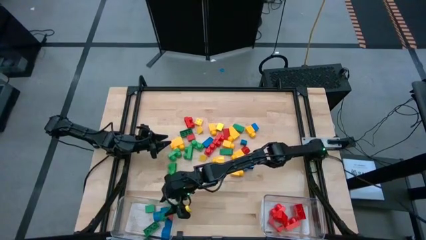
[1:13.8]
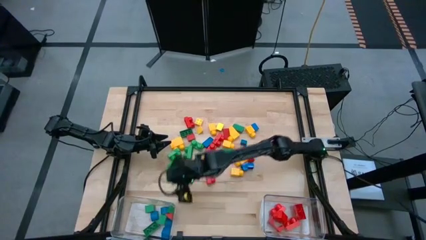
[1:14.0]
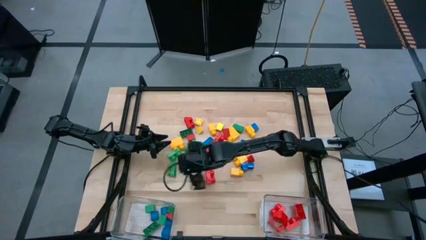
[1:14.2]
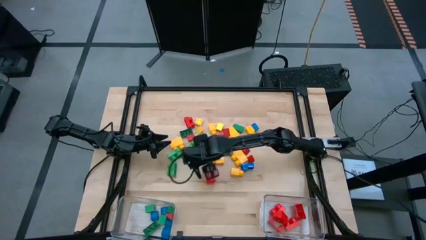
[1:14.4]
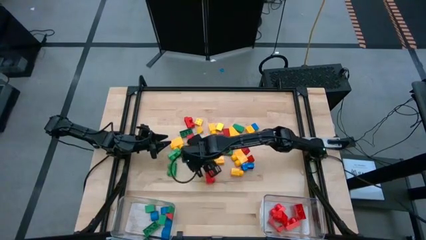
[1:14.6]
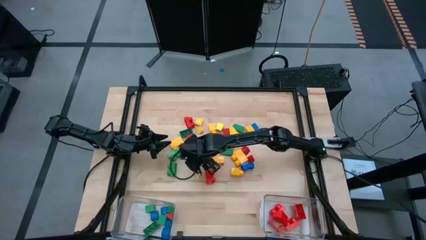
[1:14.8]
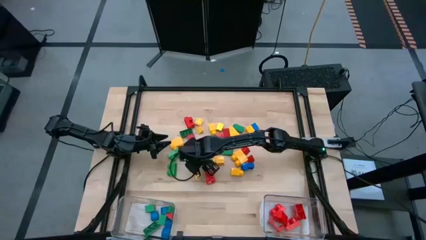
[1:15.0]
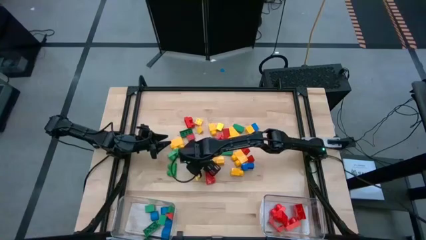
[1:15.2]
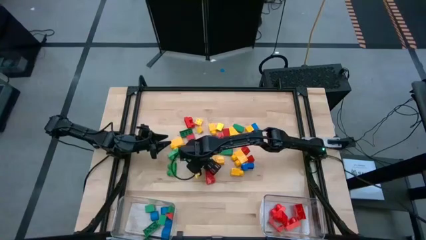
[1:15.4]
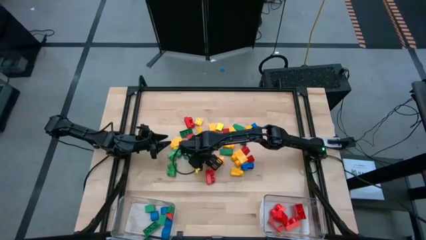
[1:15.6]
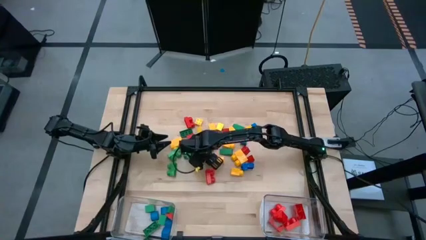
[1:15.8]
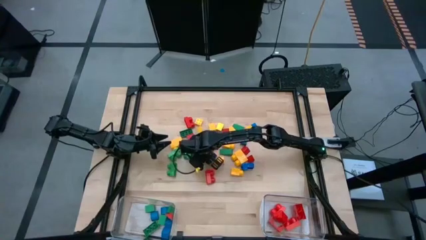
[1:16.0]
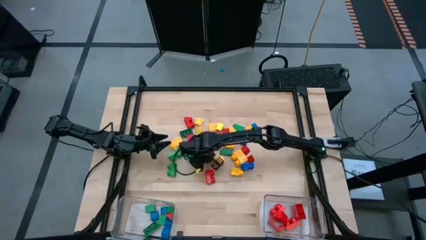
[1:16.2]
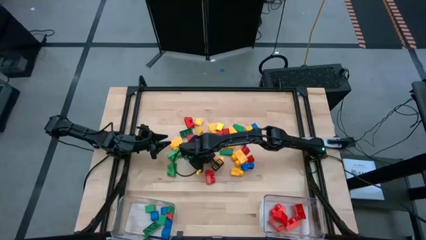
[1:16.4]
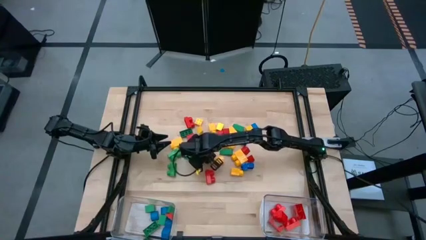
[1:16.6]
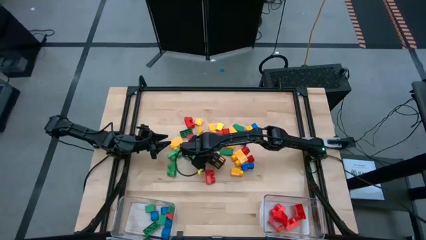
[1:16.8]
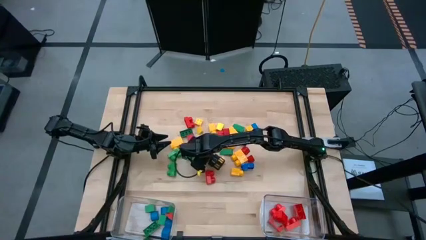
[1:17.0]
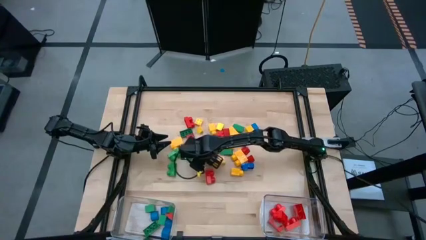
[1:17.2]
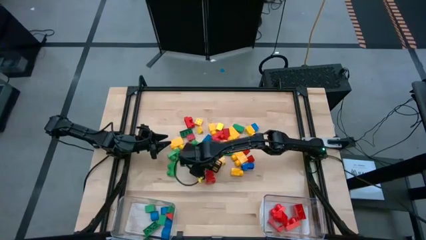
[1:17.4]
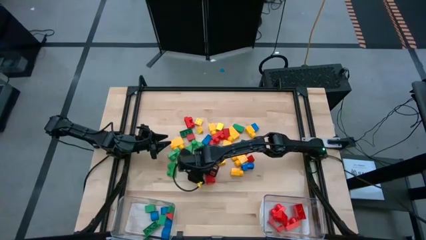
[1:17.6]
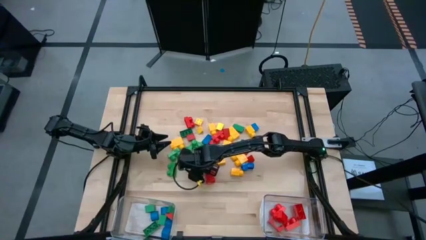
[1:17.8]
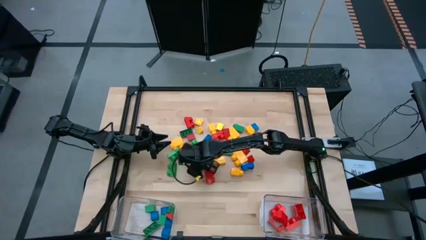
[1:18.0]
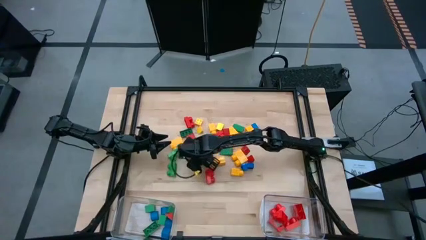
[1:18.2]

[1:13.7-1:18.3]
Task: Sort blocks by size
Put the yellow triangular block into the right transparent bin

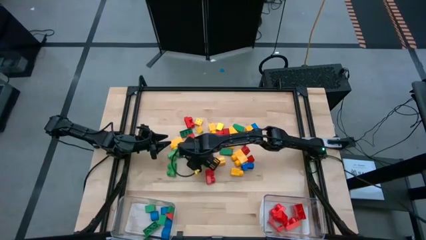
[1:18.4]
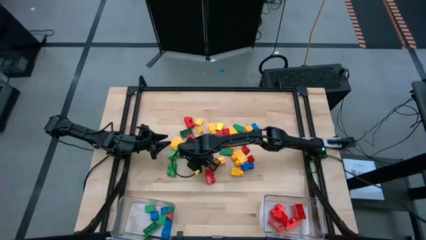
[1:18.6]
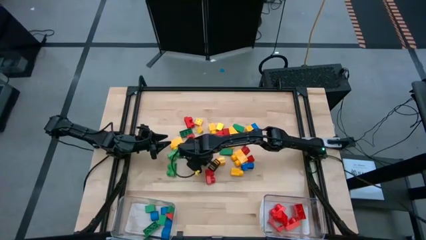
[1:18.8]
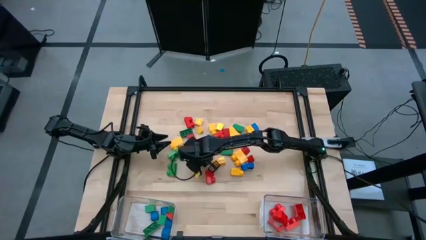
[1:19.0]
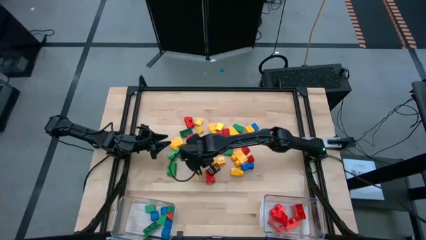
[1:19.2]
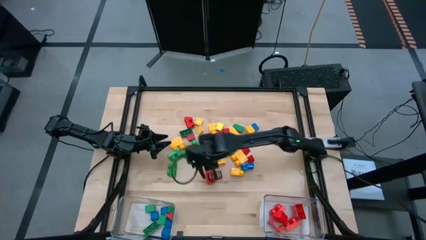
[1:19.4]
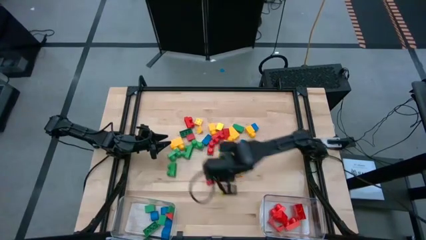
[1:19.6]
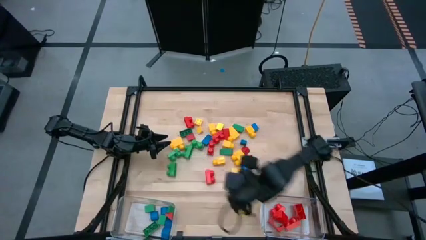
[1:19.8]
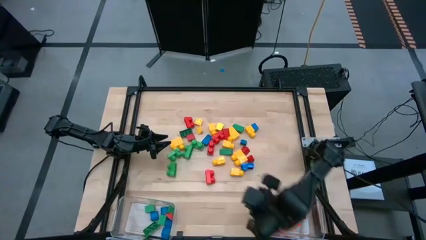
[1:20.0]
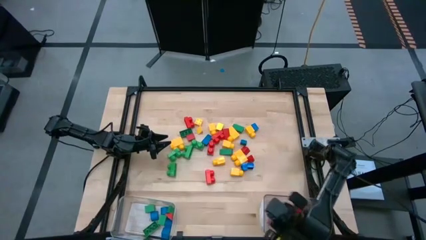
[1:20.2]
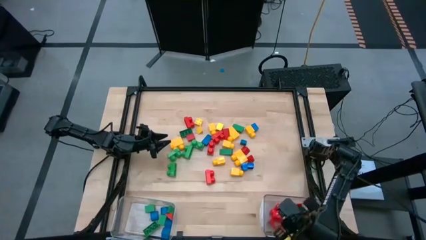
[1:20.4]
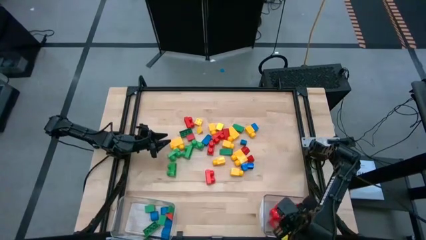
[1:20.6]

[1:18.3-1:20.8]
Put the yellow triangular block into the right transparent bin

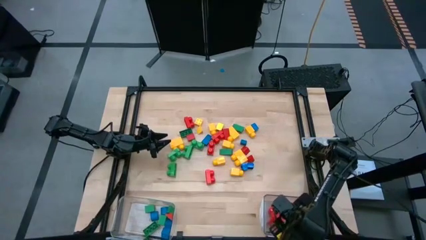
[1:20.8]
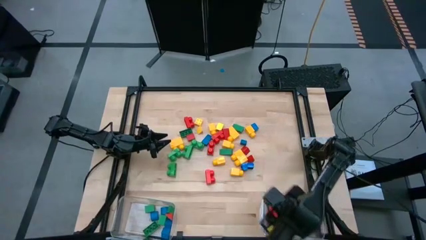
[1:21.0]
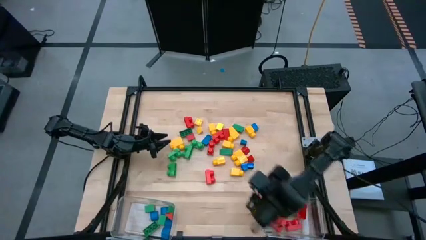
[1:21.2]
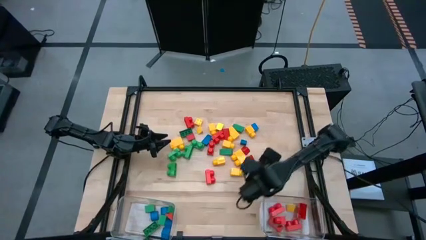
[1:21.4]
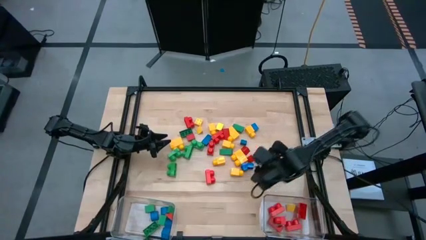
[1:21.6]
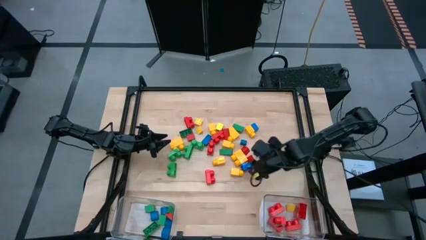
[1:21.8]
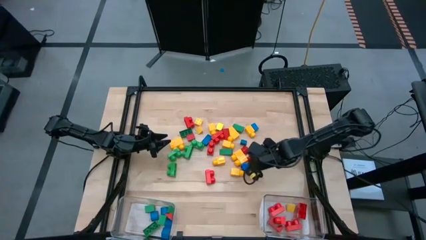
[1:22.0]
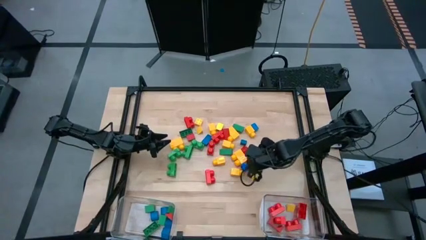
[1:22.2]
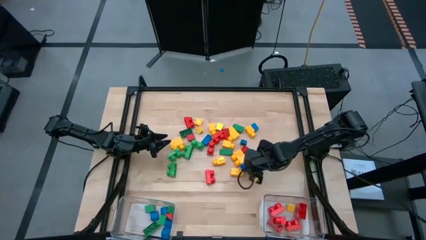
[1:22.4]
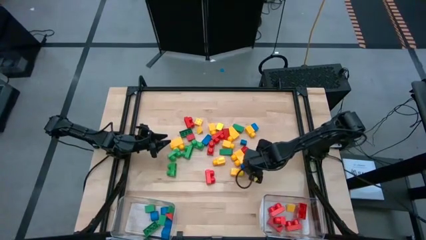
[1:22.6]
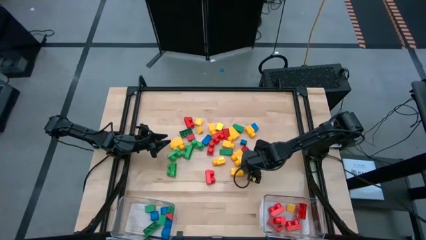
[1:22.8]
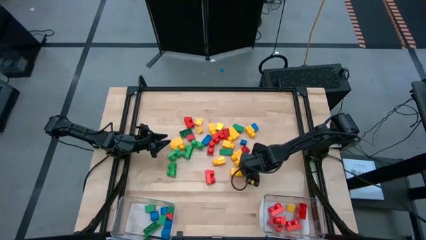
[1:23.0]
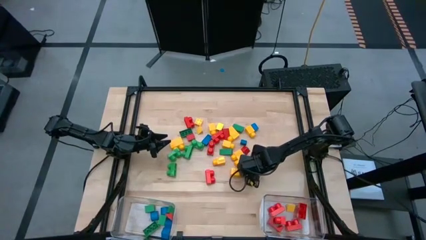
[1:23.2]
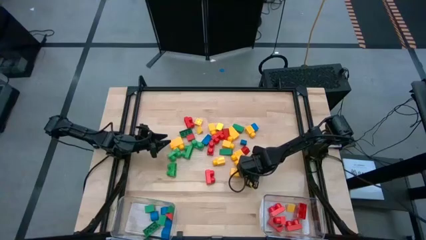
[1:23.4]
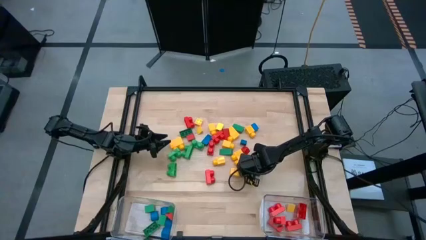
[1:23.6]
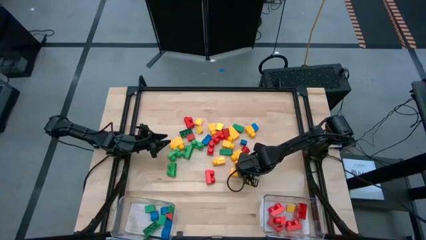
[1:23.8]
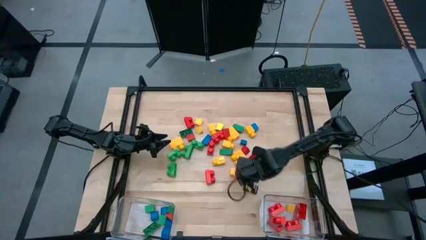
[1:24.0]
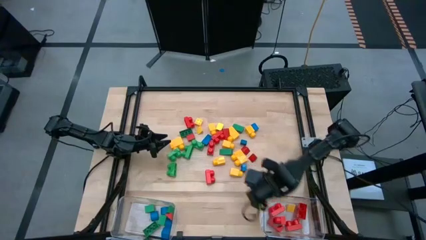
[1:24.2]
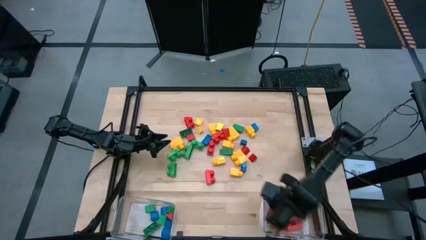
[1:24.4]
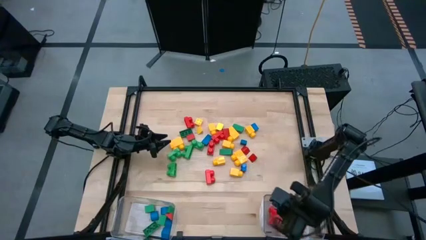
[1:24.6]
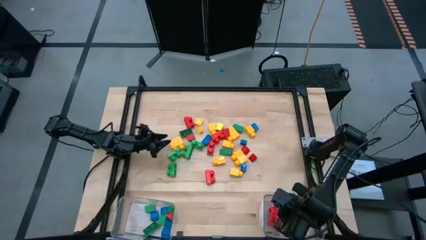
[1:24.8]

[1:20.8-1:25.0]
Put the blue game piece into the right transparent bin

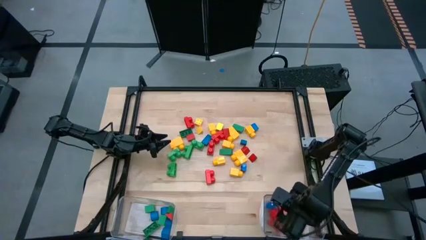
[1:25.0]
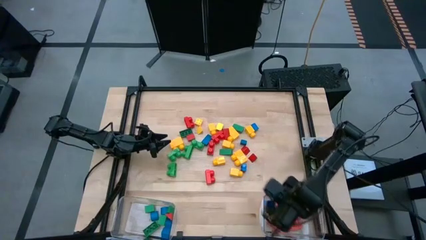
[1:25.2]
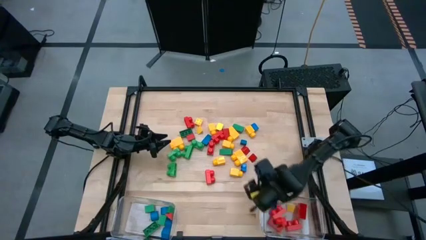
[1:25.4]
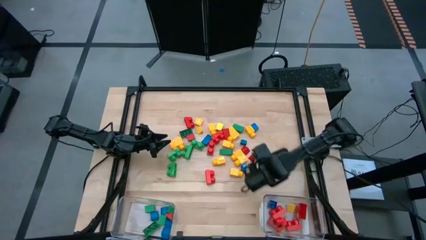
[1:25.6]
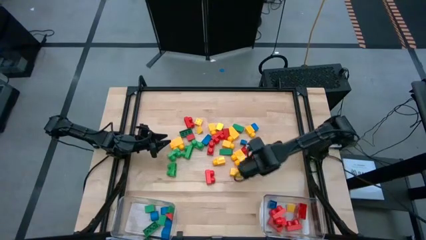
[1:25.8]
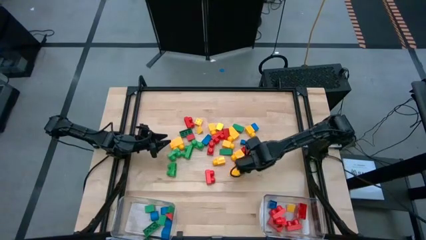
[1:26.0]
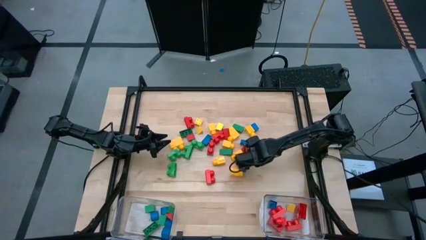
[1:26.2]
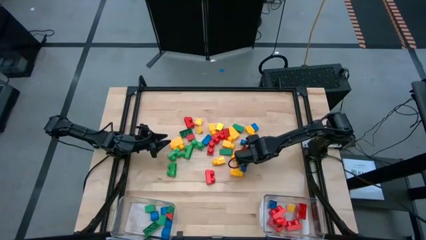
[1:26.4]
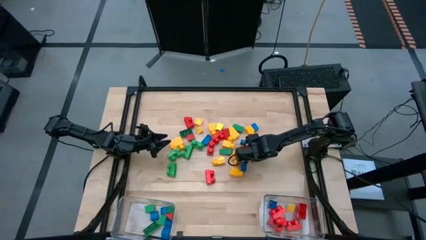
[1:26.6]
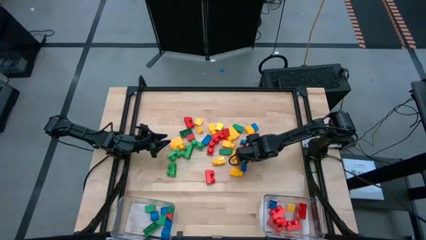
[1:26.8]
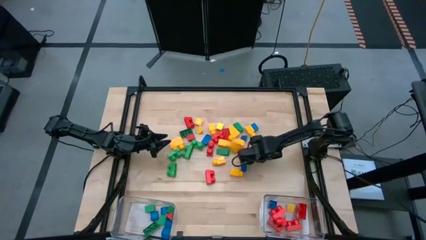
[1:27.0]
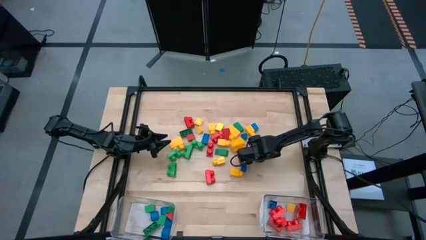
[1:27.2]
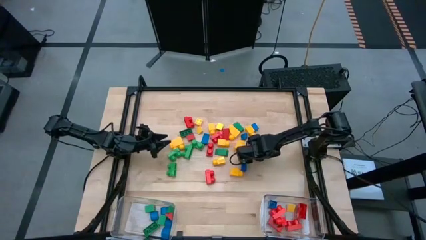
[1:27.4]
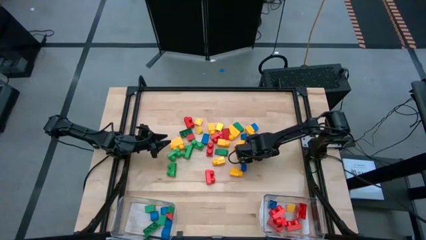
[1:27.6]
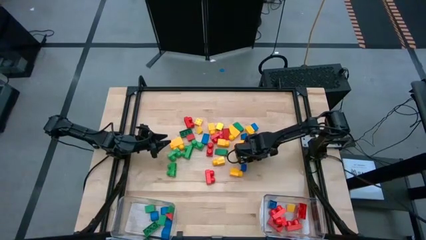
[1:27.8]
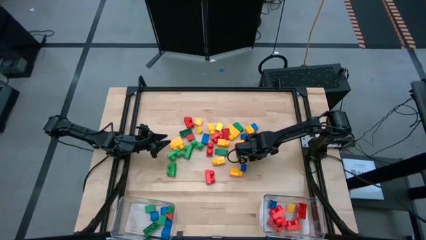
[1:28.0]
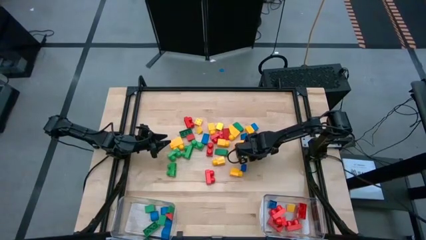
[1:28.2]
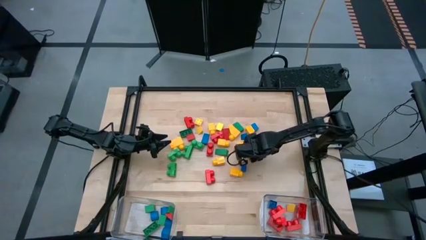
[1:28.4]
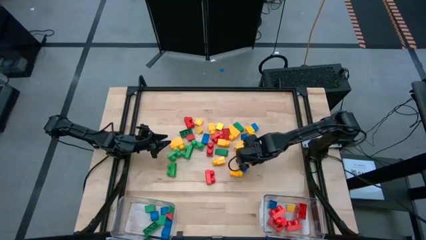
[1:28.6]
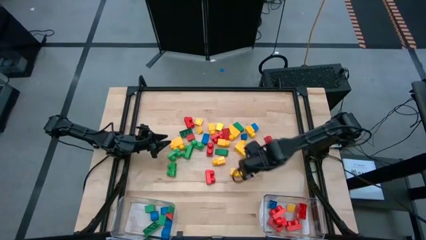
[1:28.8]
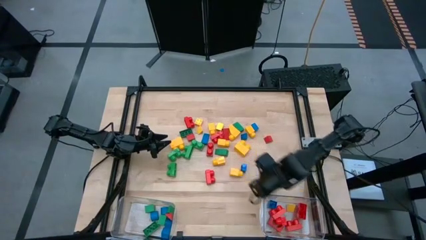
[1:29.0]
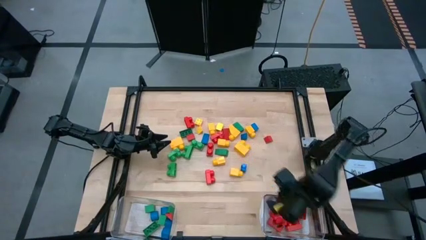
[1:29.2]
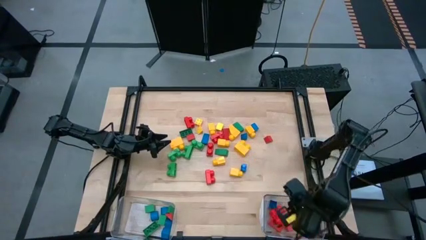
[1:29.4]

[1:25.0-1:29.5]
Put the red triangular block into the right transparent bin
